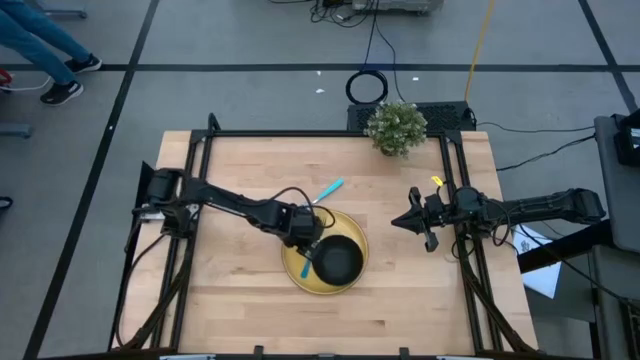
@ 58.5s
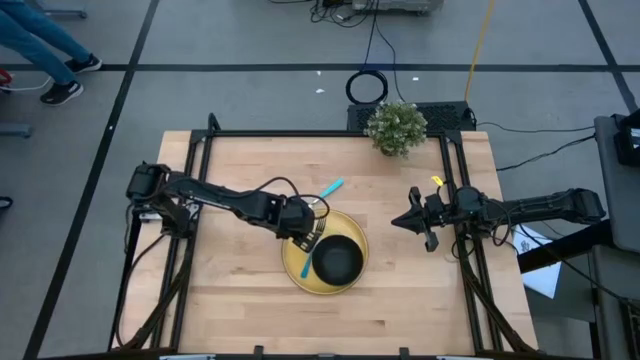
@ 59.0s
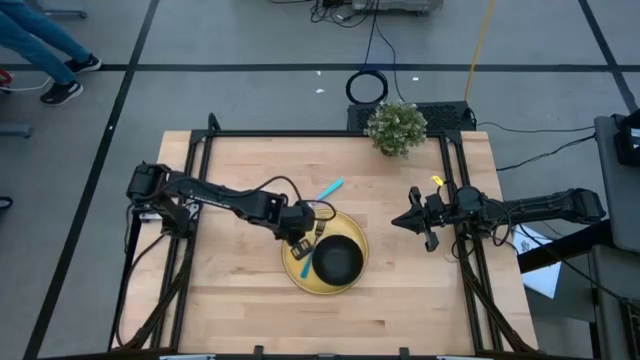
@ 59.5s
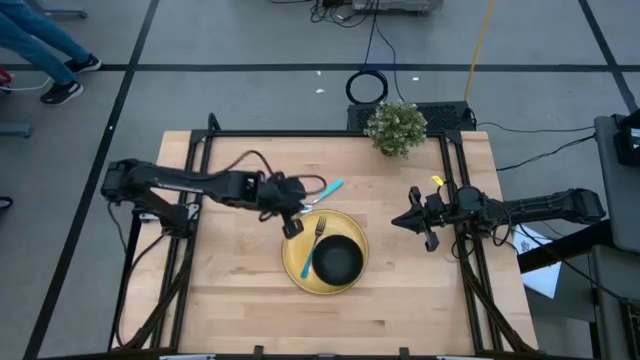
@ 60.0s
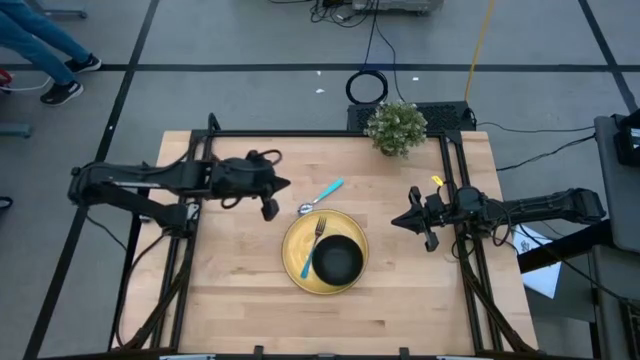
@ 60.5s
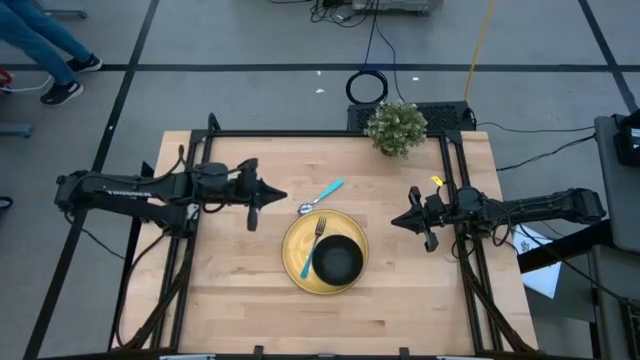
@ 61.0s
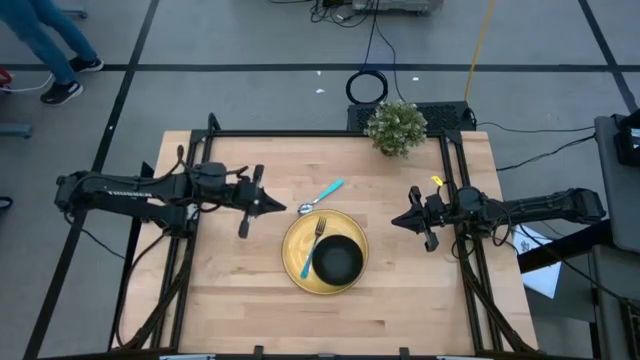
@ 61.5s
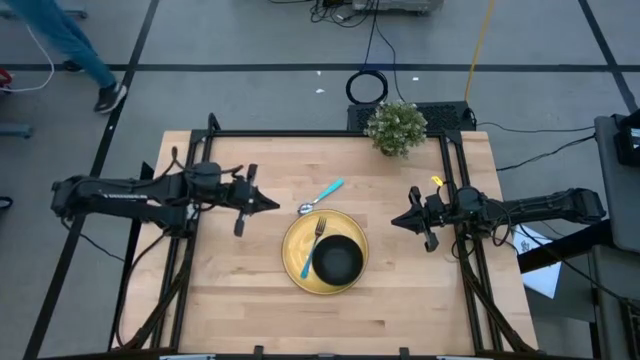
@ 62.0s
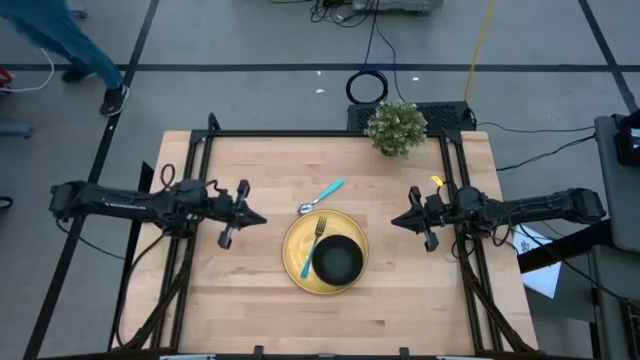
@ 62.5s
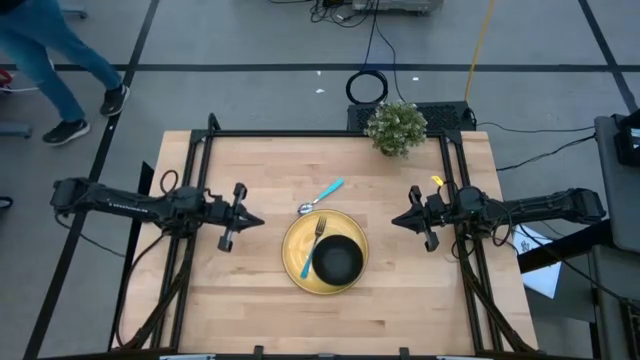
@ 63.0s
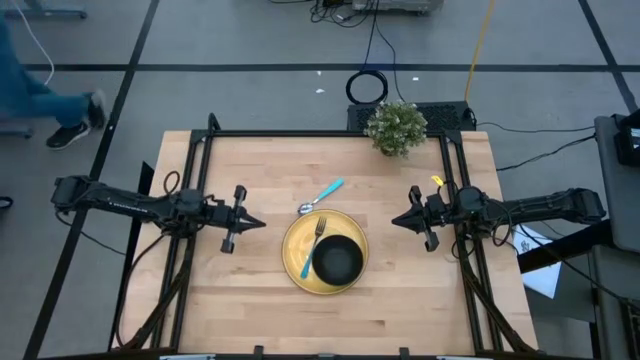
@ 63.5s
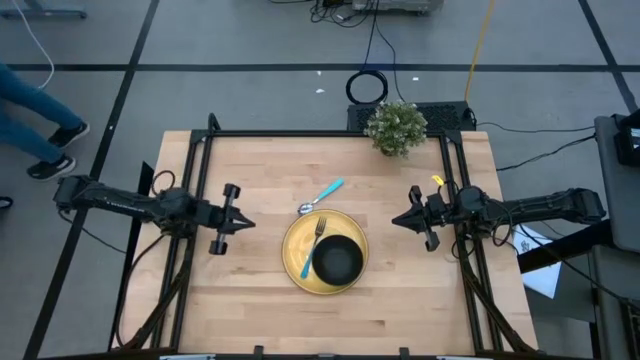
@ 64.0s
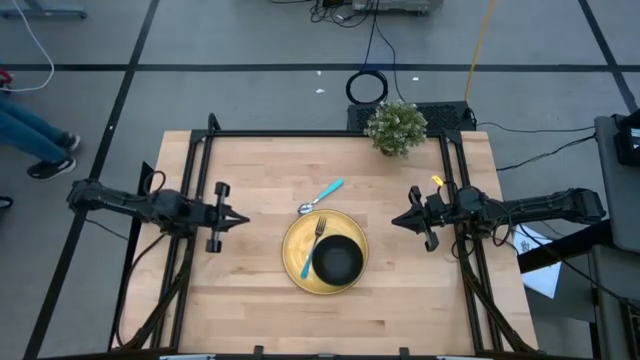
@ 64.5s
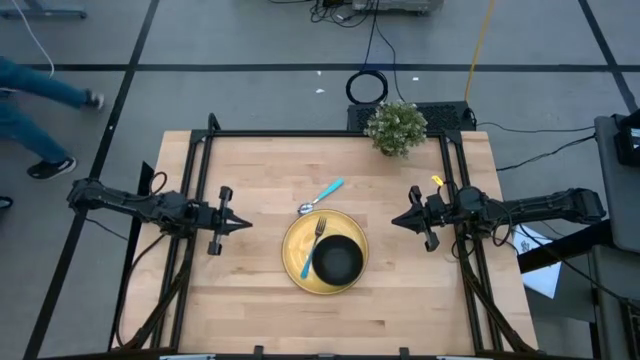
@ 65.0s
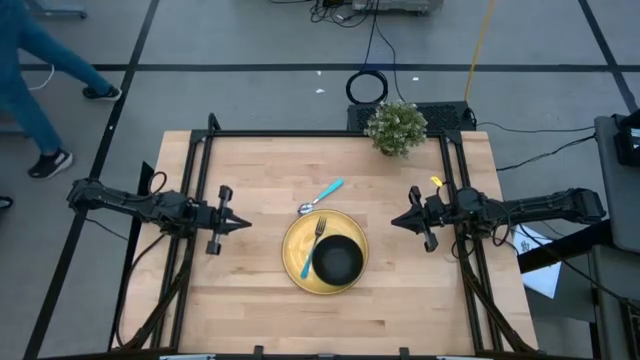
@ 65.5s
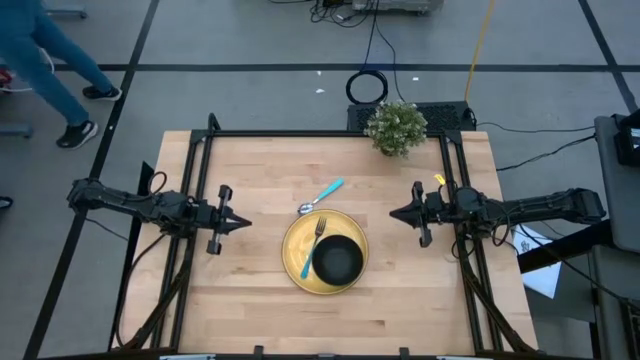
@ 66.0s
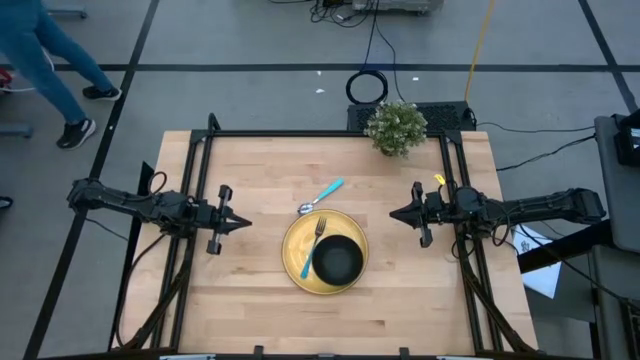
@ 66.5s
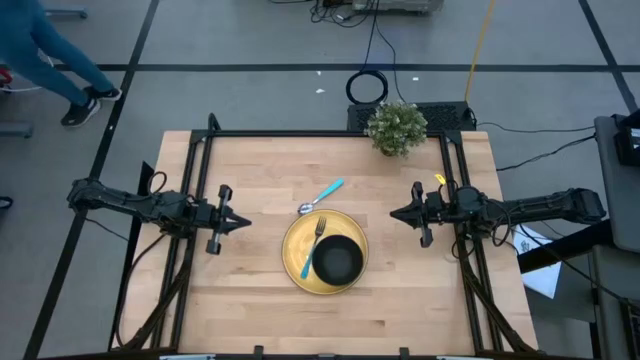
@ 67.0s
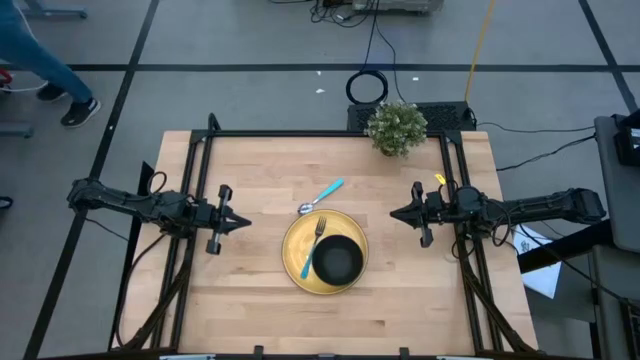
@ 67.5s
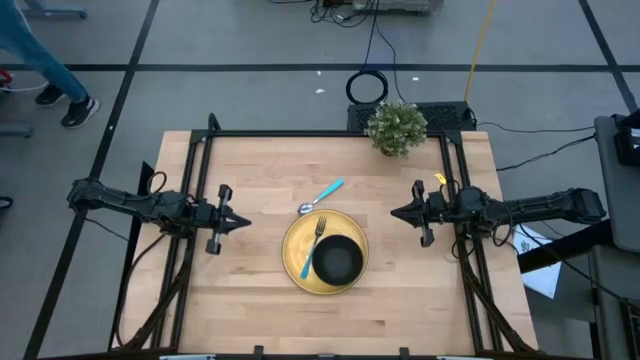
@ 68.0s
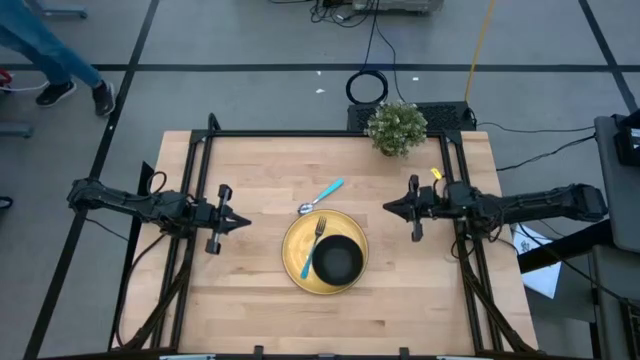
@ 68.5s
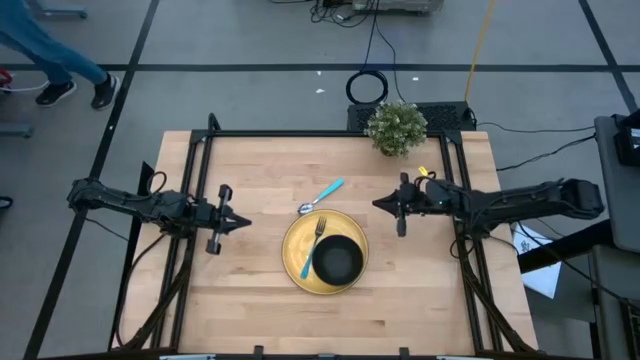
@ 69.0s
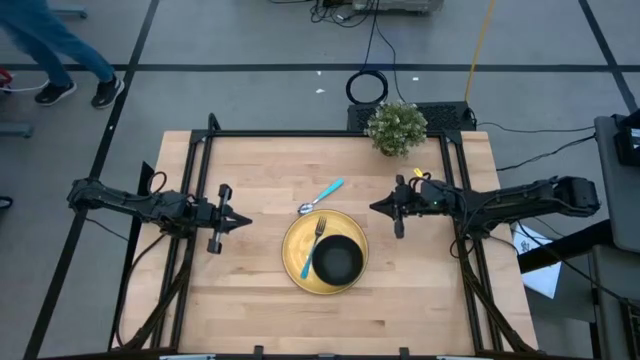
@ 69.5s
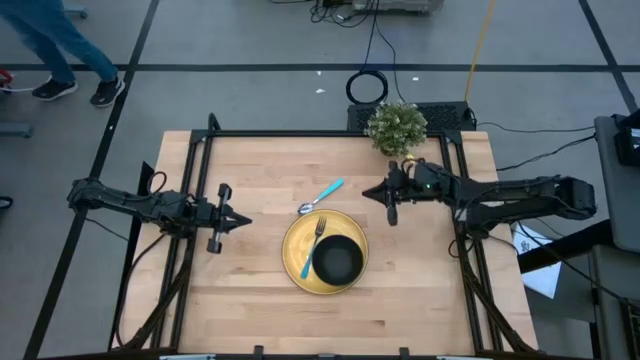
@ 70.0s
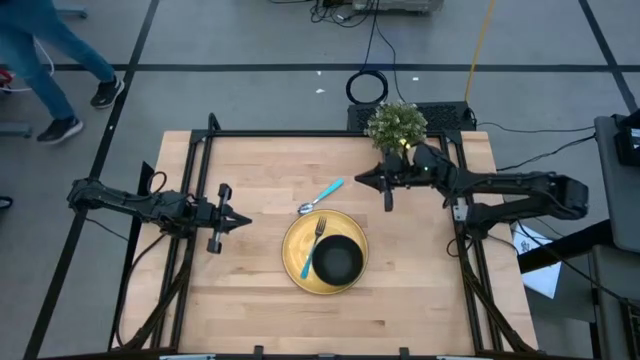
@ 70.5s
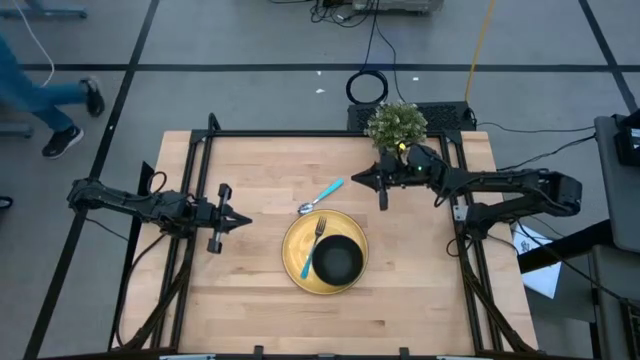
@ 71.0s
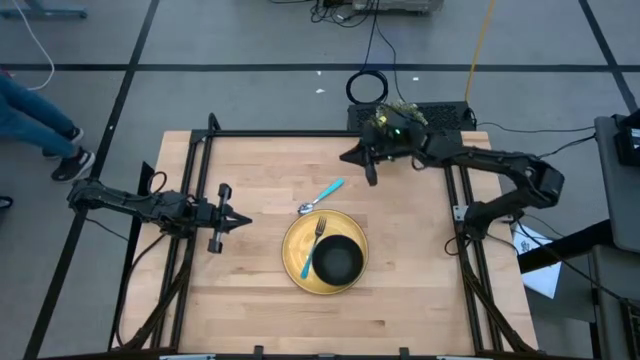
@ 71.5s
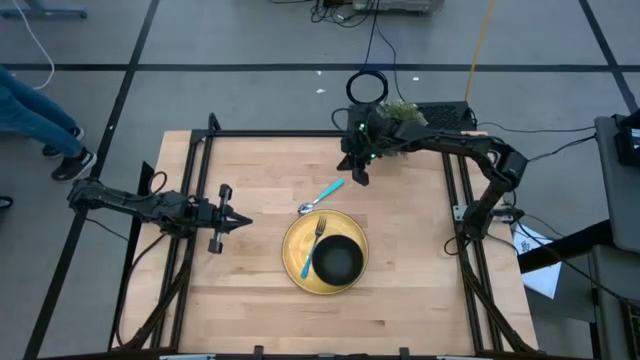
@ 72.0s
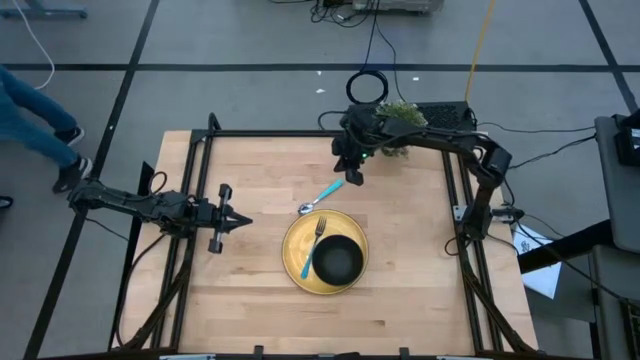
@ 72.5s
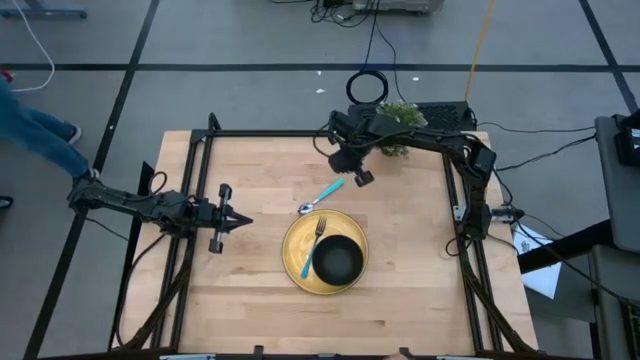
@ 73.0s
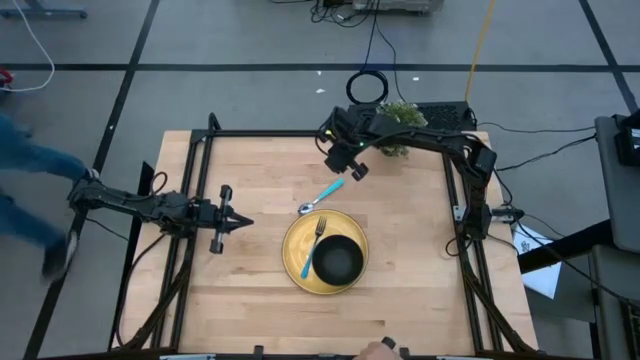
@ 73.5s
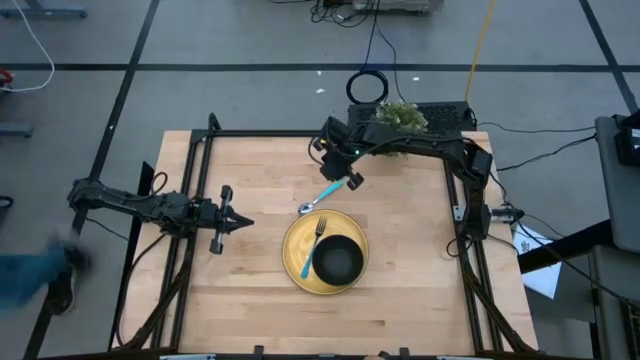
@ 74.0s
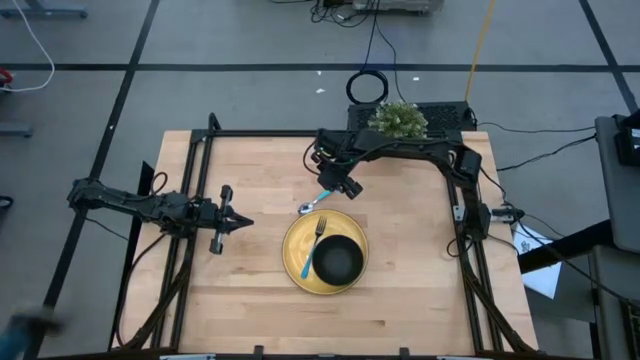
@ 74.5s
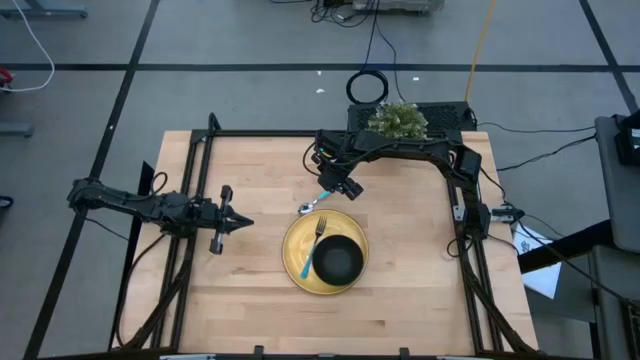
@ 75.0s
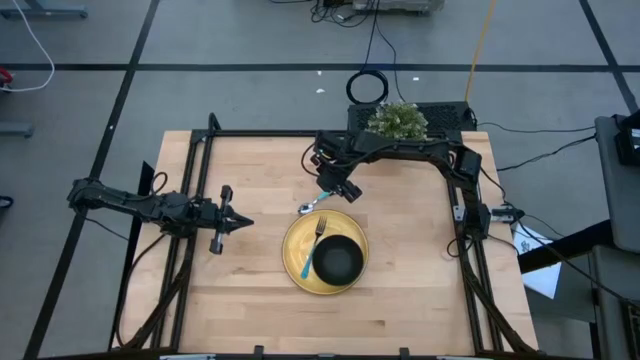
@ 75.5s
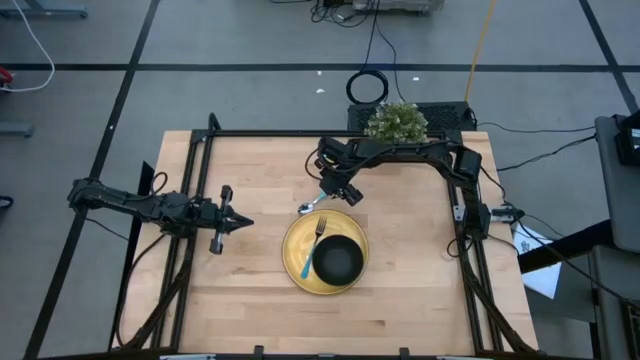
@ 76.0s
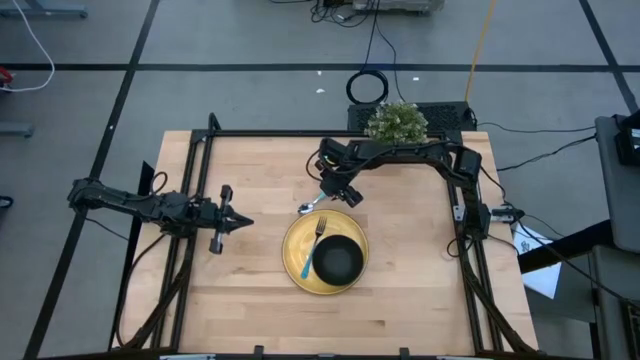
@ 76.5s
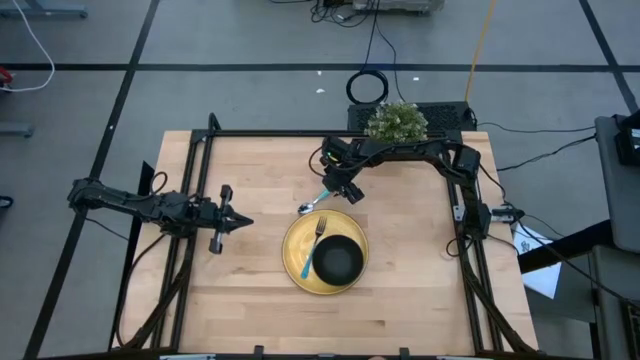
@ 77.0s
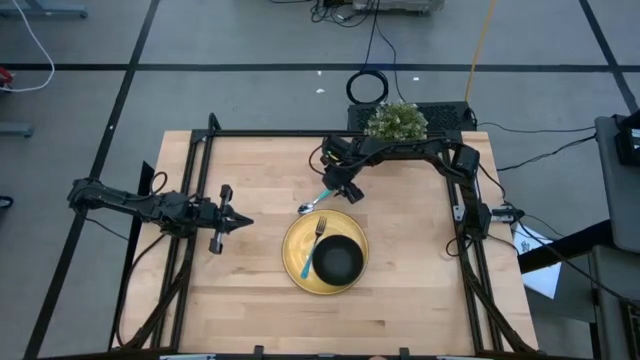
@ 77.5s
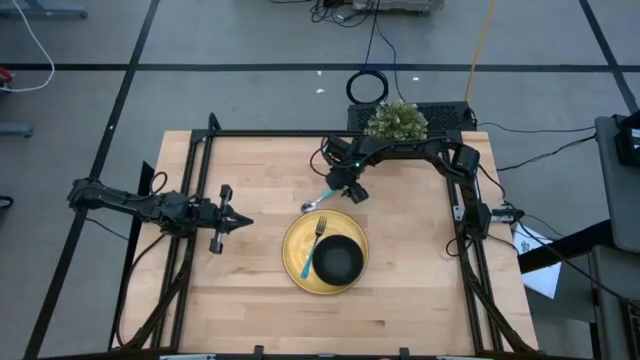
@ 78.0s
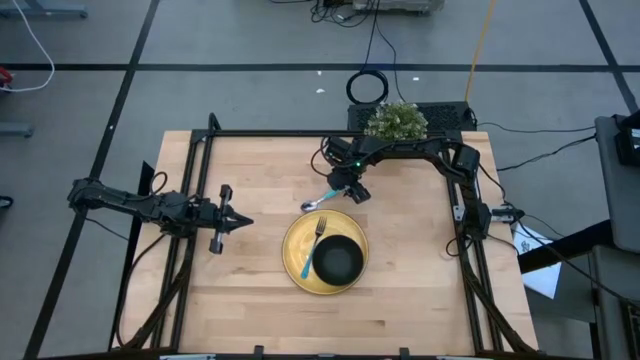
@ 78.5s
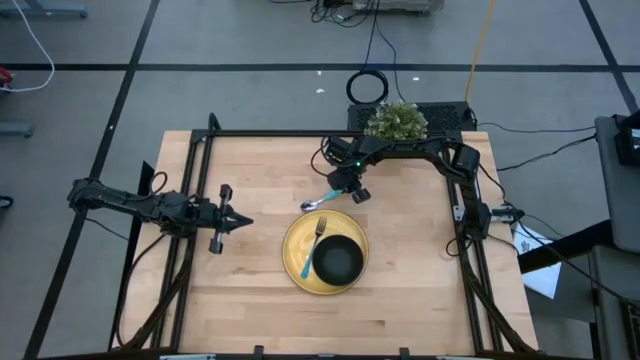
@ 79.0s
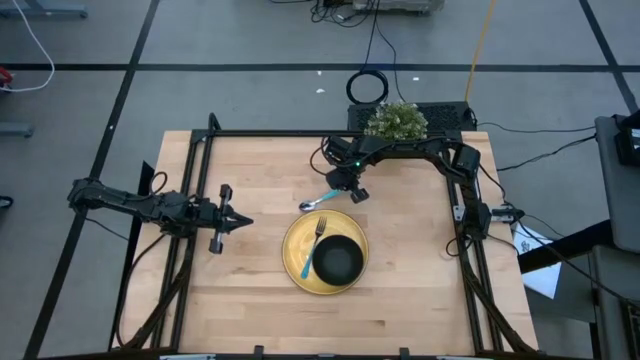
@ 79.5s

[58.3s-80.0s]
Task: Set table place
Put the spoon into the top black bowl
